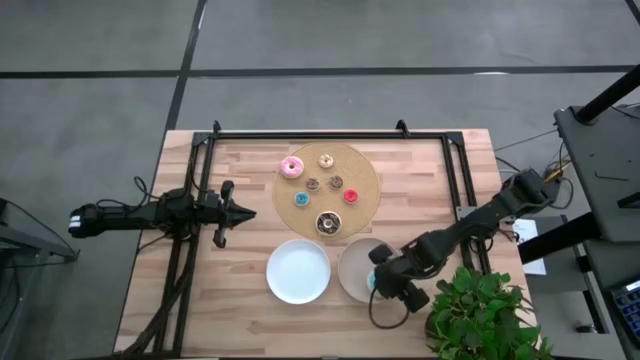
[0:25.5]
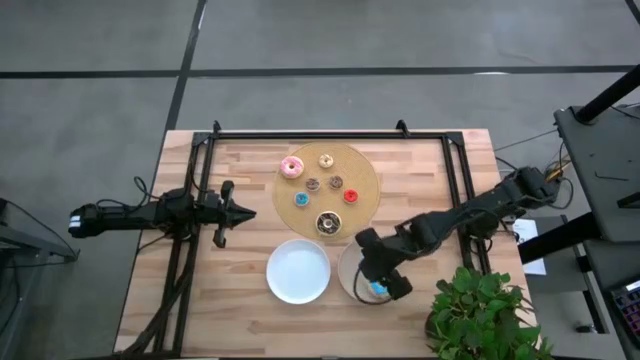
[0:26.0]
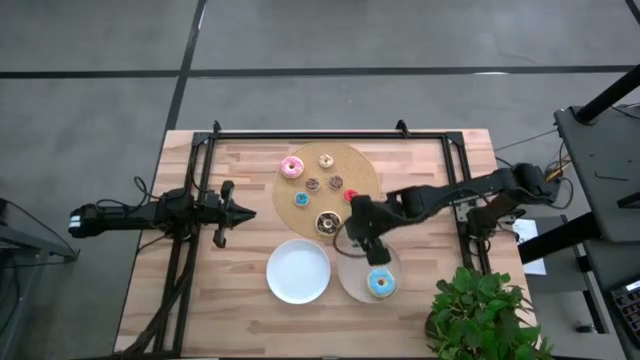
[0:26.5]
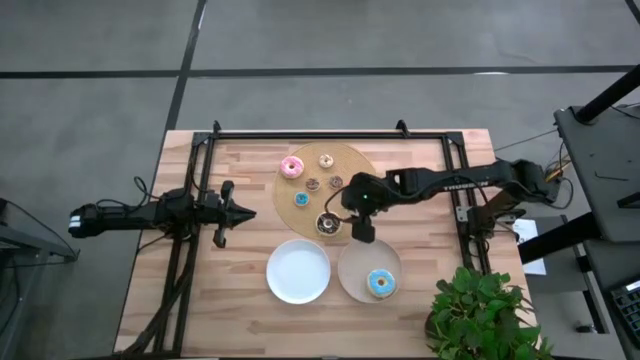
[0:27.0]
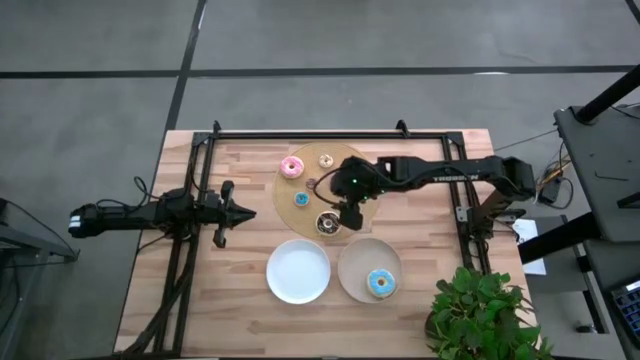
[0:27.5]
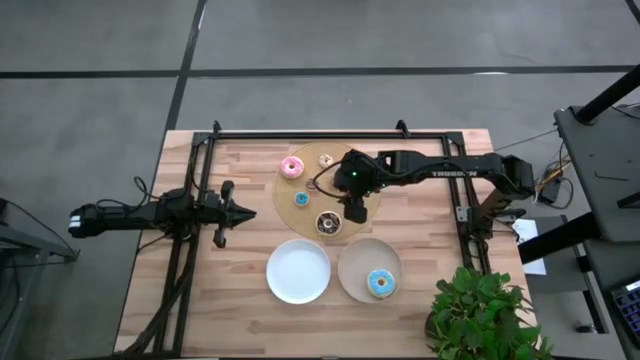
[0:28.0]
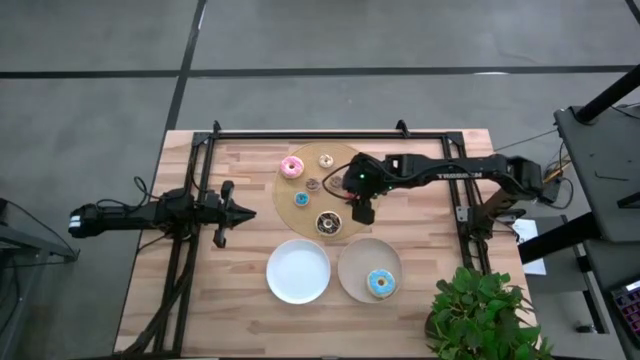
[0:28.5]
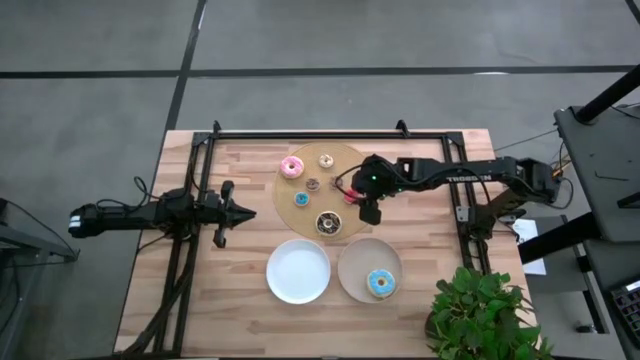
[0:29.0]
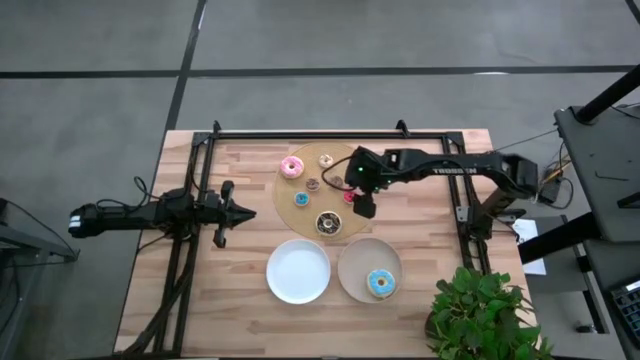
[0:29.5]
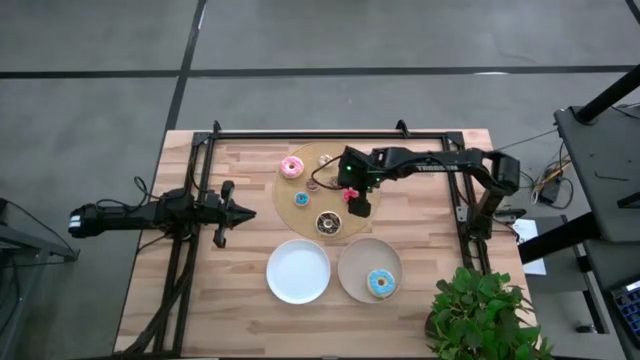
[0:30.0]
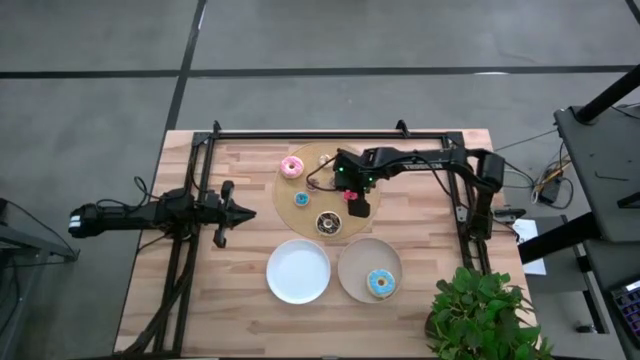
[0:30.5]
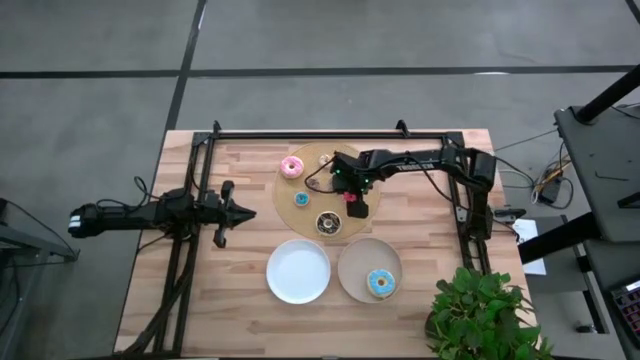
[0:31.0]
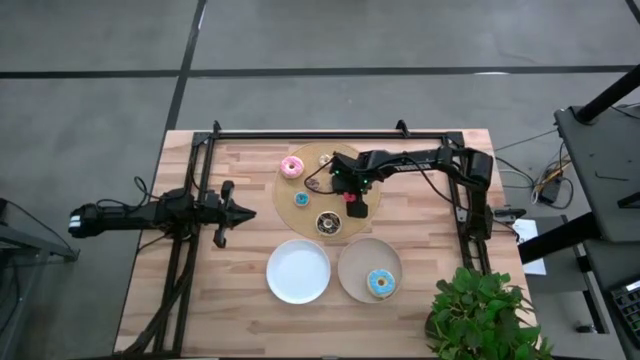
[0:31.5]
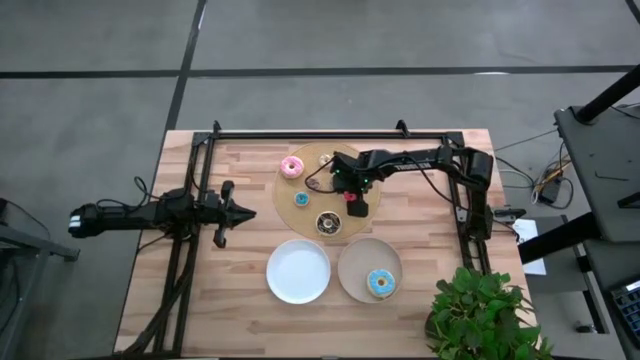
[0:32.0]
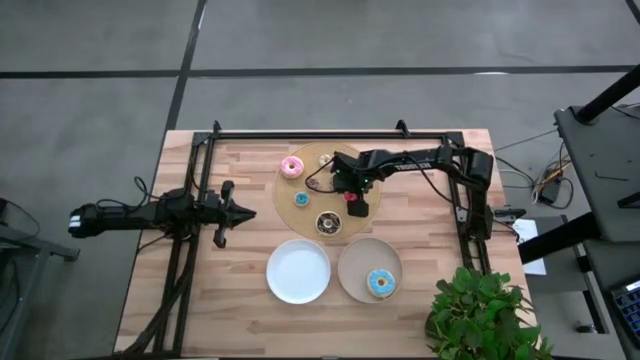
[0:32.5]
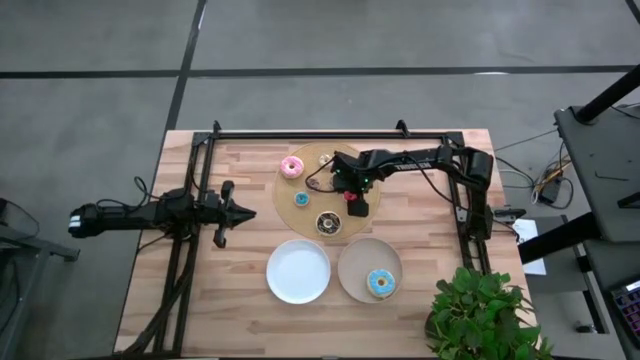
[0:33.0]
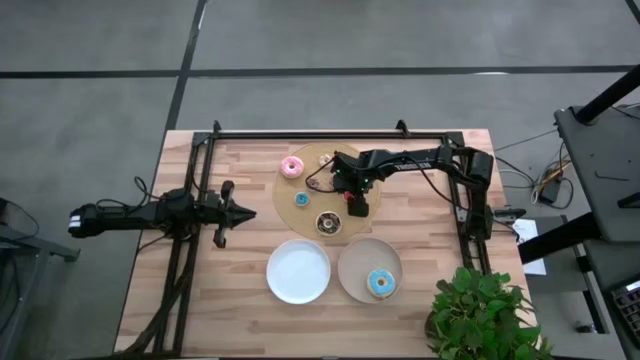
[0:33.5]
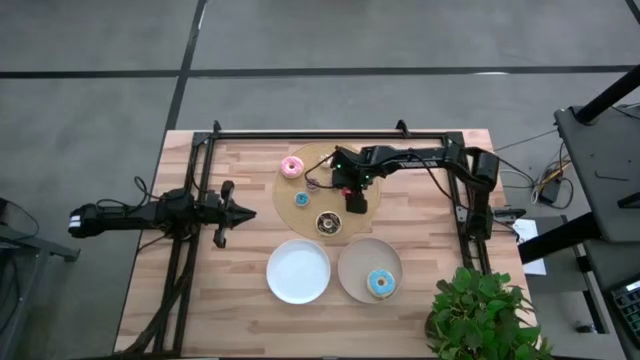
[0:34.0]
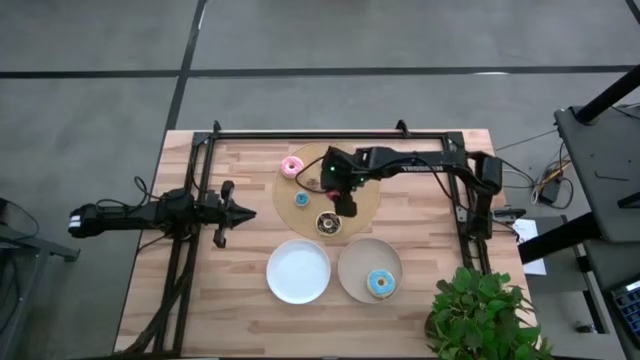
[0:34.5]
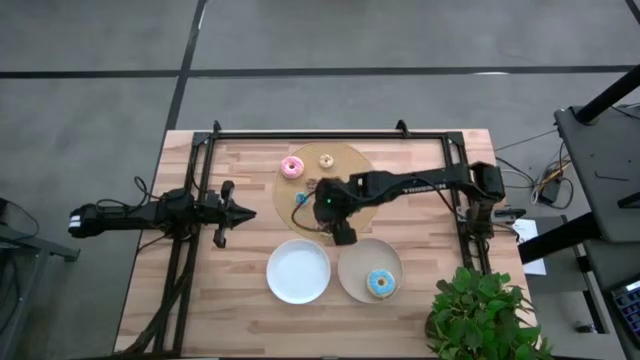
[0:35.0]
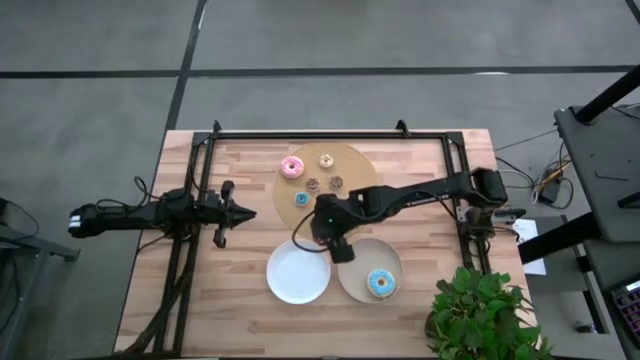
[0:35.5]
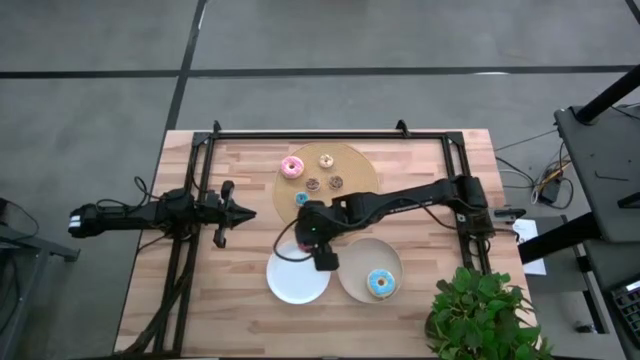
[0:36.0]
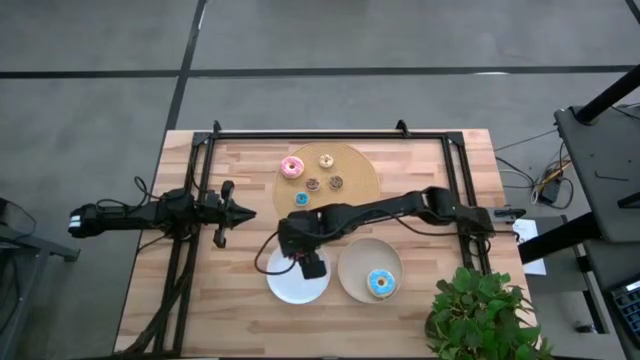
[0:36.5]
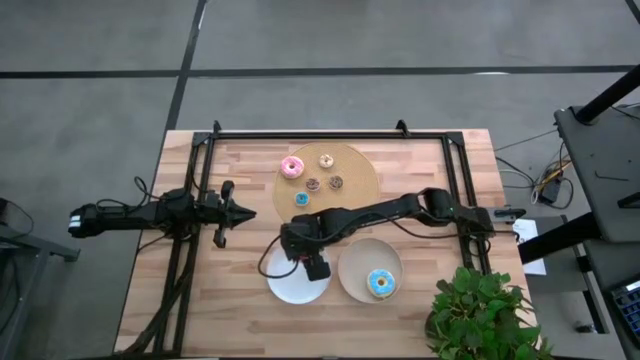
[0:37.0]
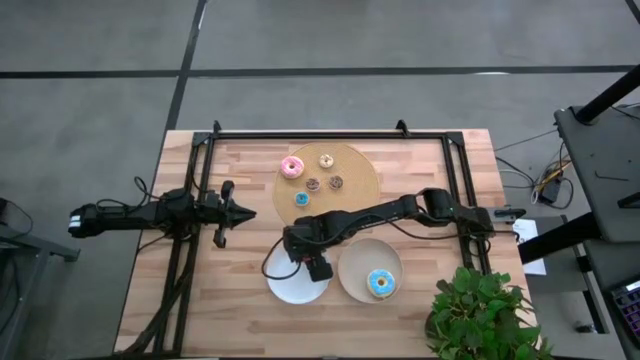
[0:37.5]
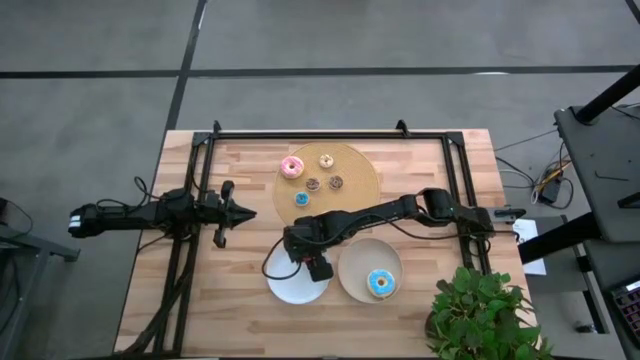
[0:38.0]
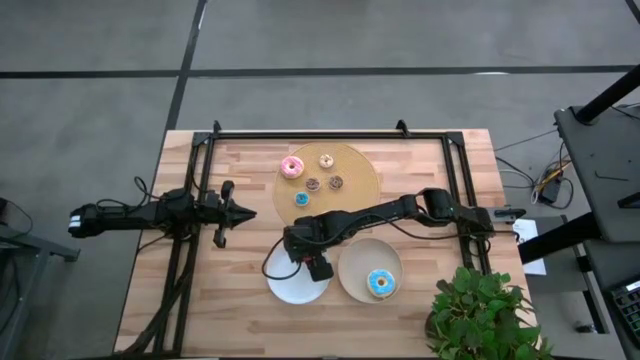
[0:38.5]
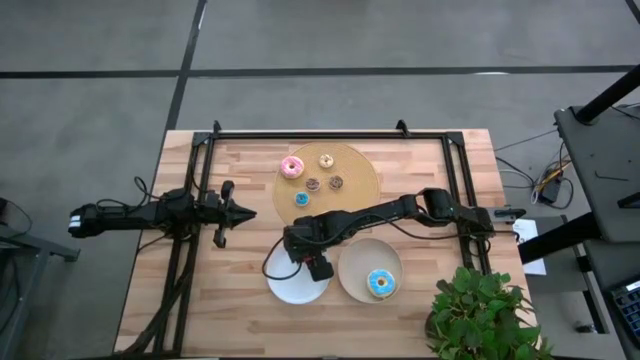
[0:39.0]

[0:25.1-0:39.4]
Task: Pick & Place donuts
Put the small red donut on the white plate

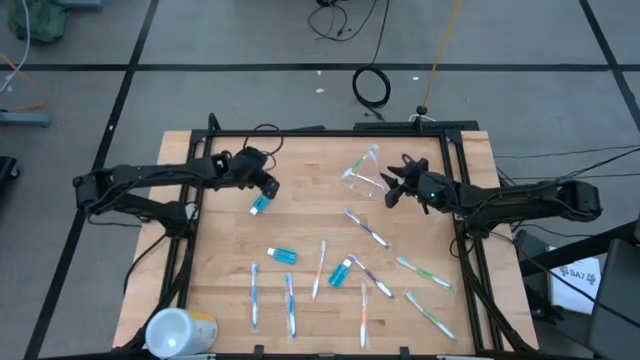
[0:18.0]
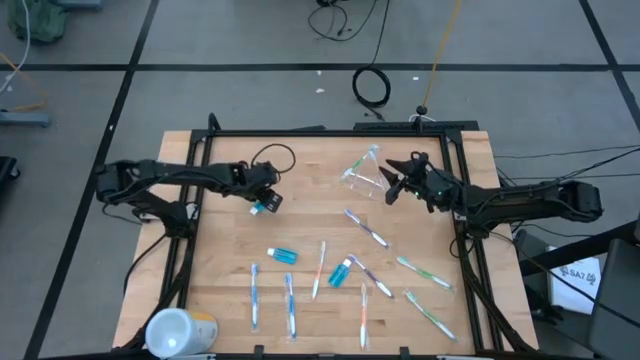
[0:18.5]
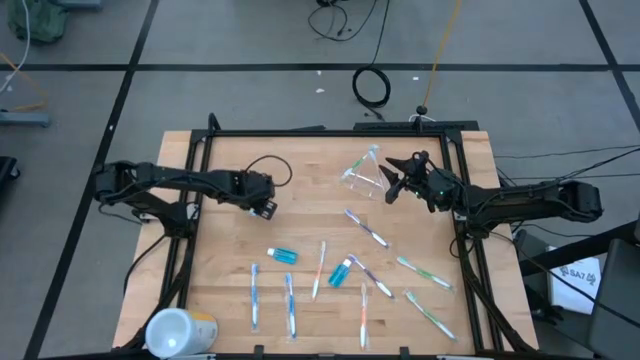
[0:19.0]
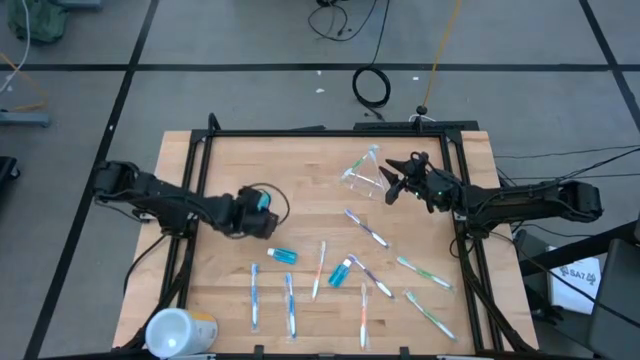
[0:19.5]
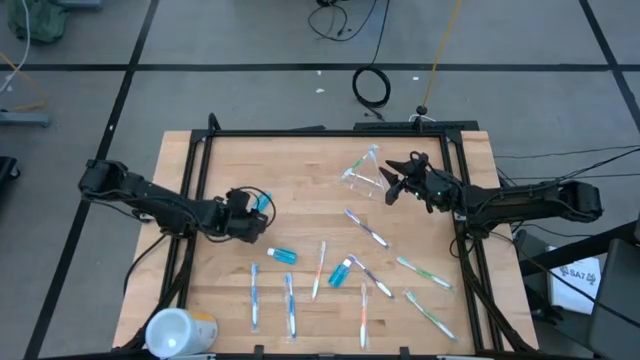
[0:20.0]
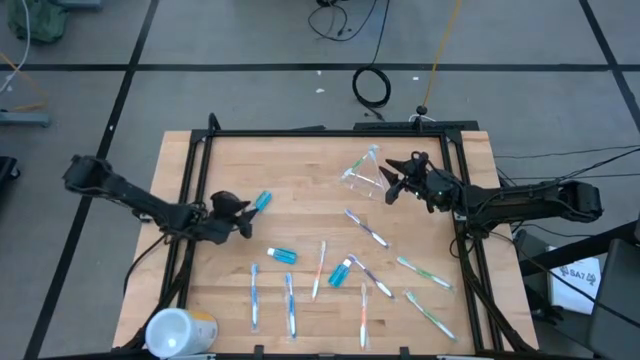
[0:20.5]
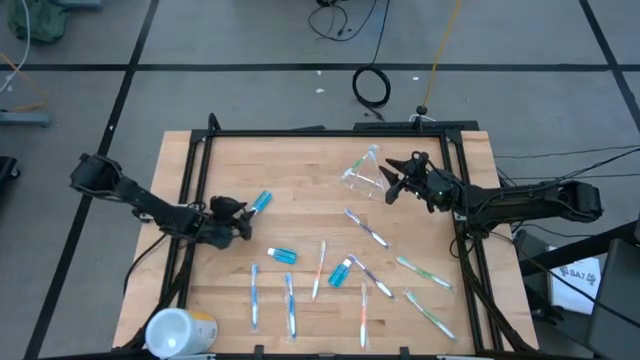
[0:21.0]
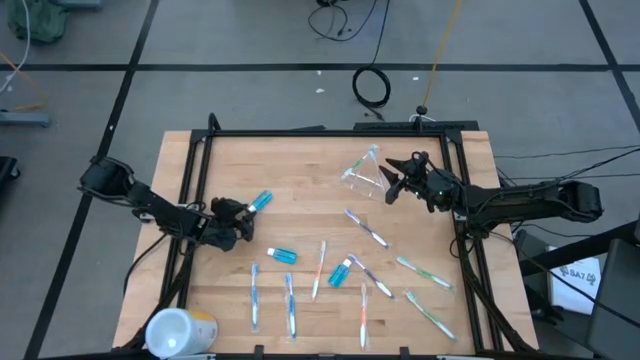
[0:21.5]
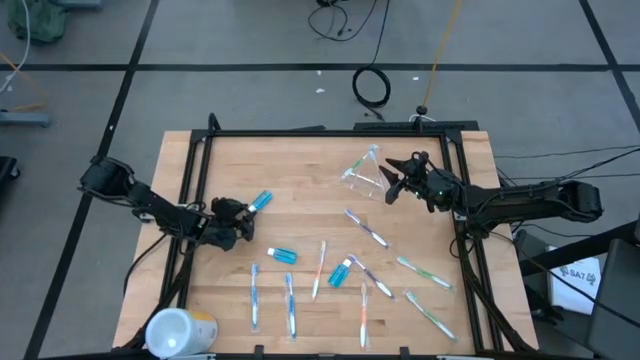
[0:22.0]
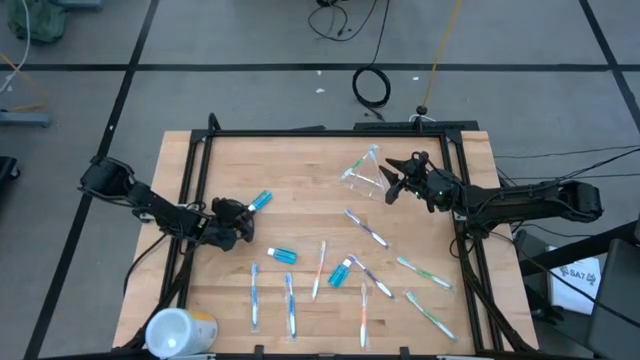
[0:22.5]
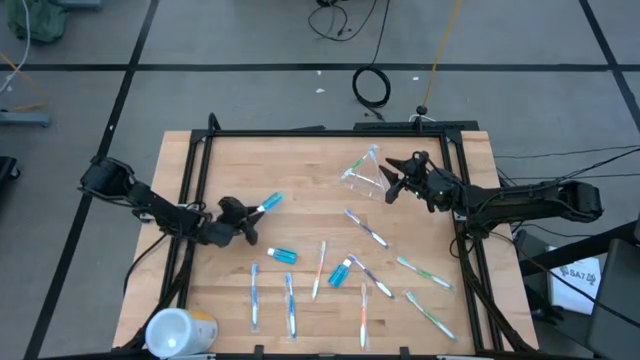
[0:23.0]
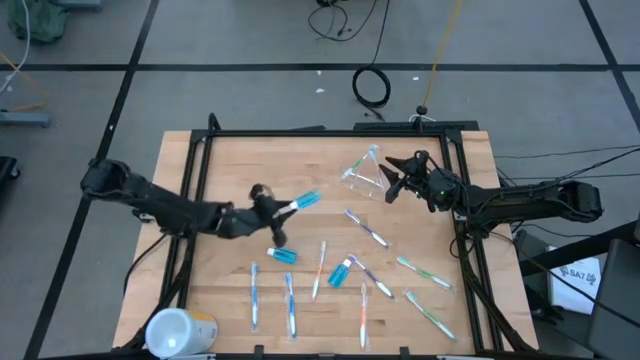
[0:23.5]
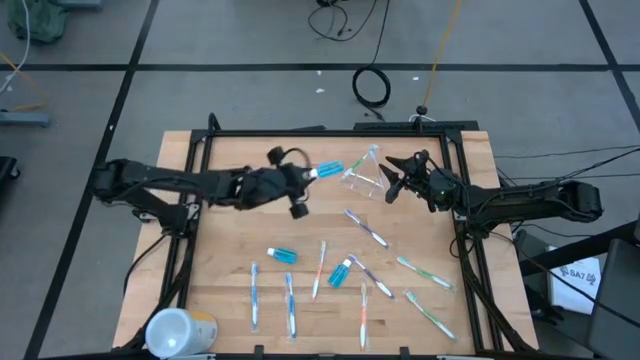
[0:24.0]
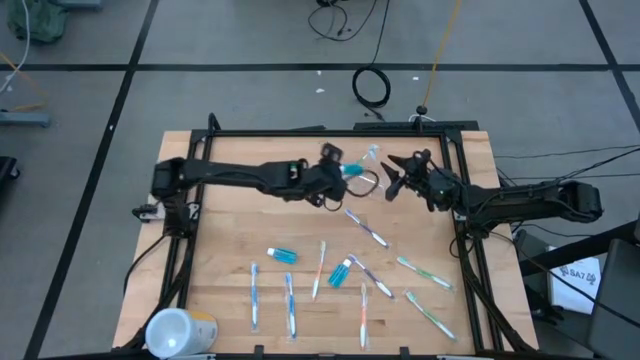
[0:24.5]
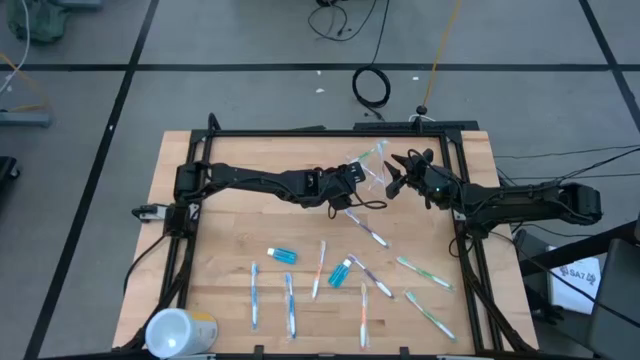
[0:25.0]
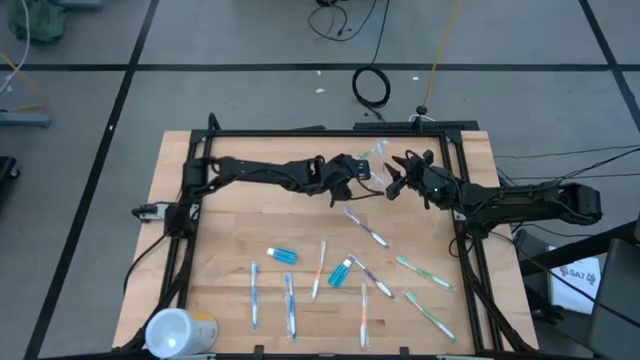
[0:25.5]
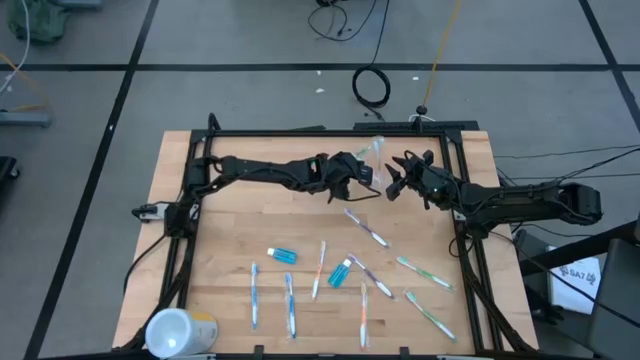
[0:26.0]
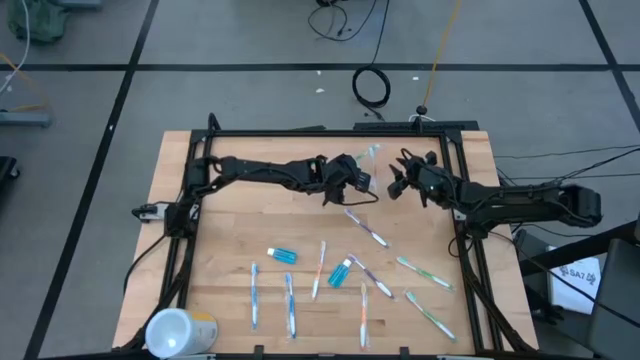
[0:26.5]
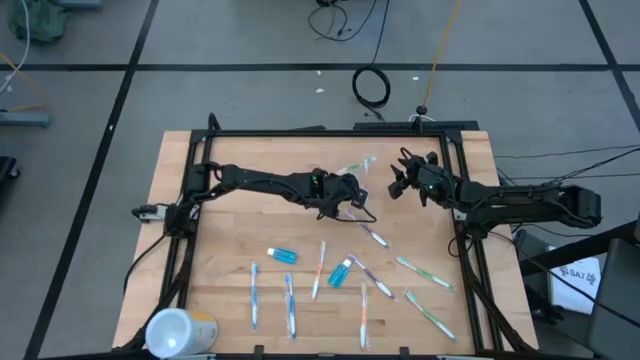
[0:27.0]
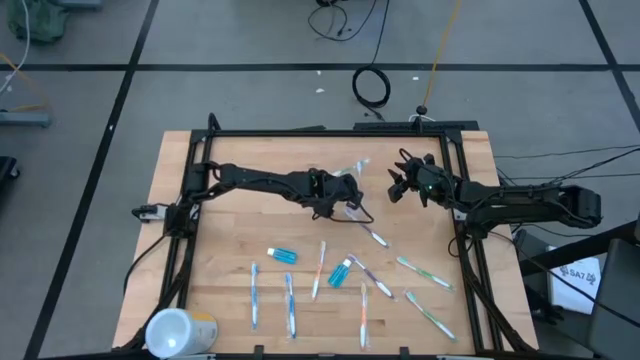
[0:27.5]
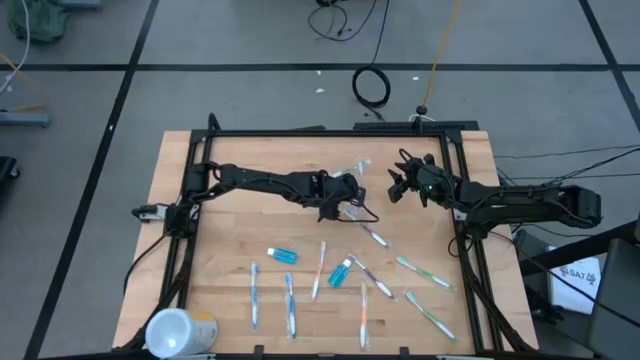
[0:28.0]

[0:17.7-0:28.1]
Task: Pick & Place toothbrushing station
Put the top left blue mouthwash into the transparent organizer
